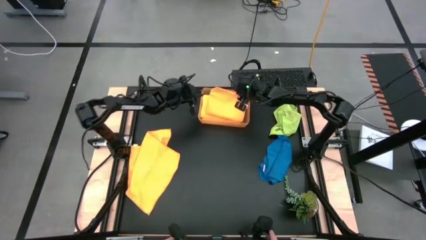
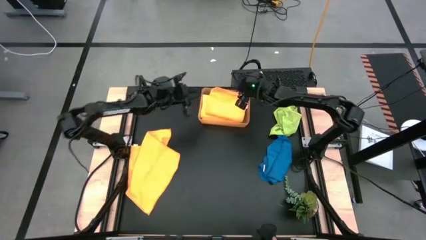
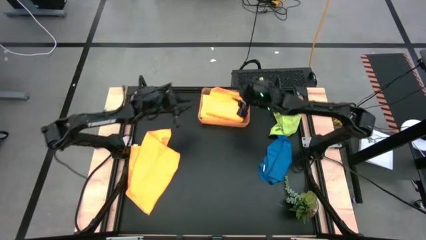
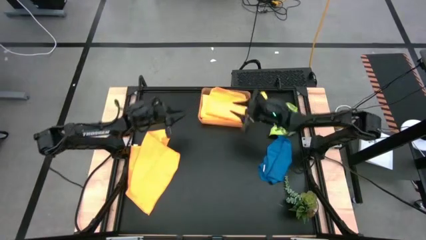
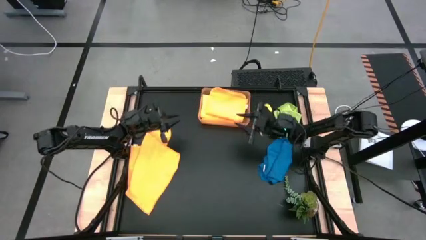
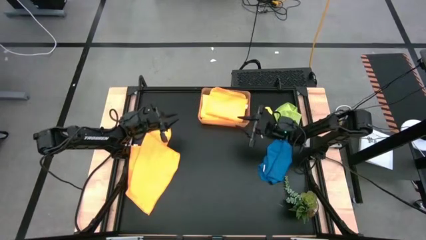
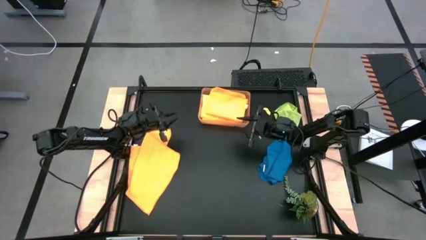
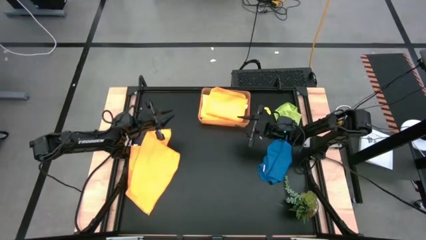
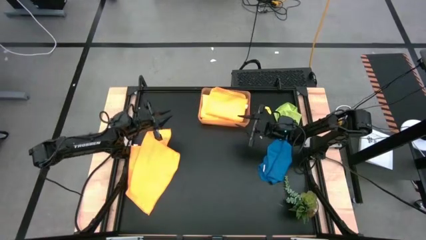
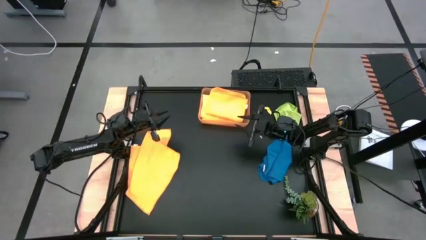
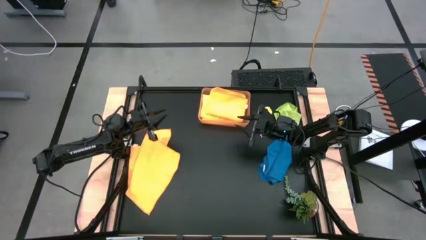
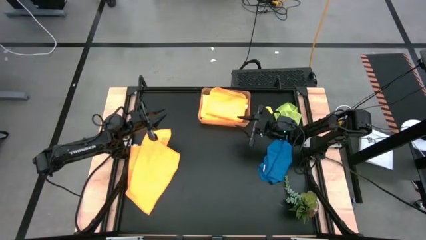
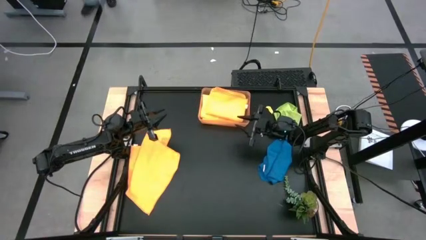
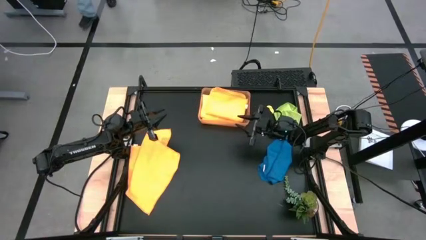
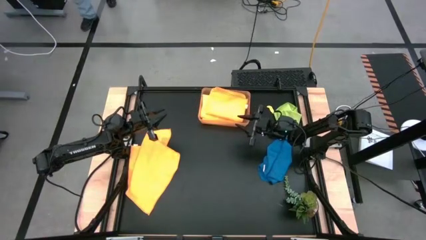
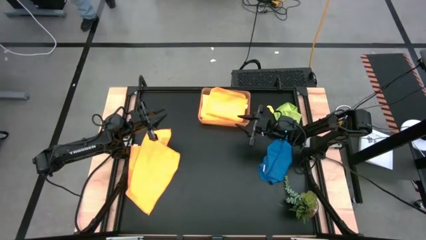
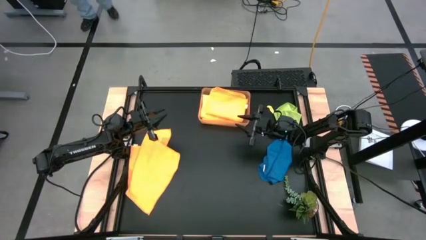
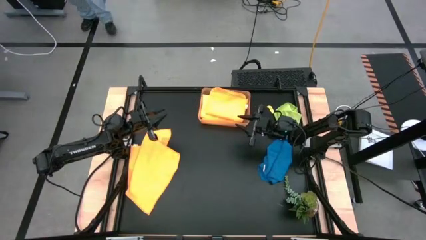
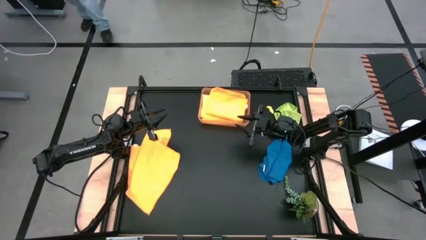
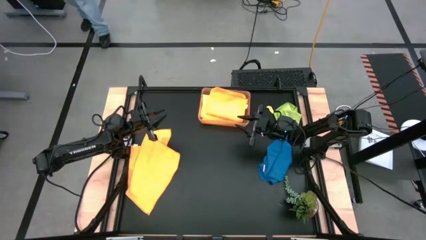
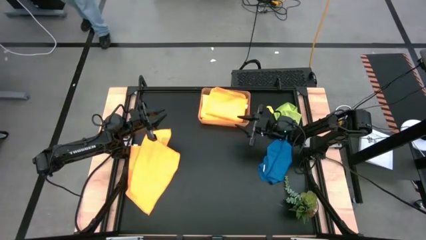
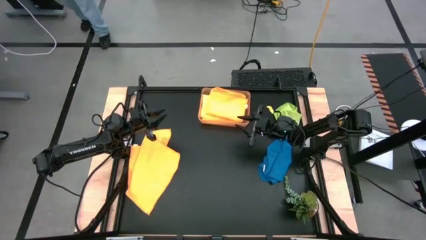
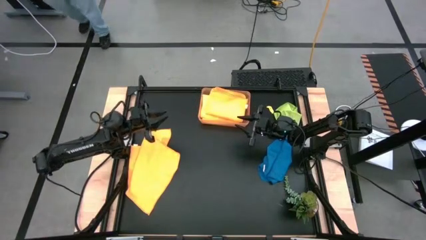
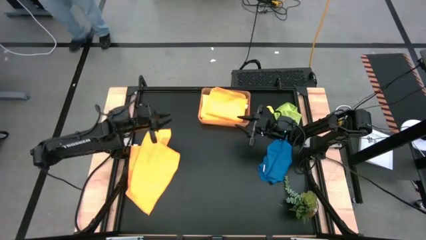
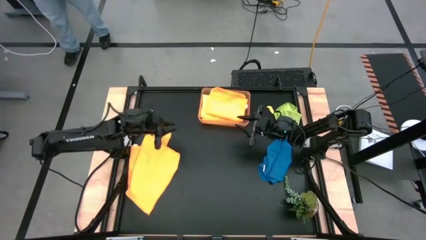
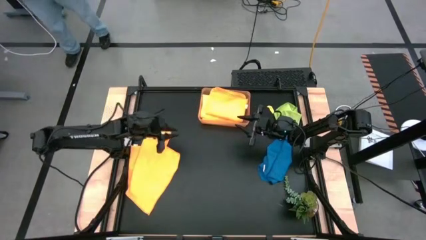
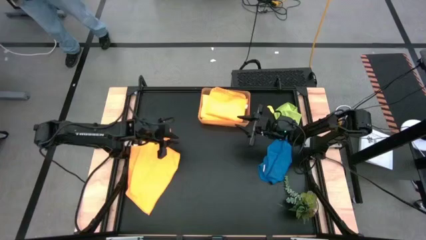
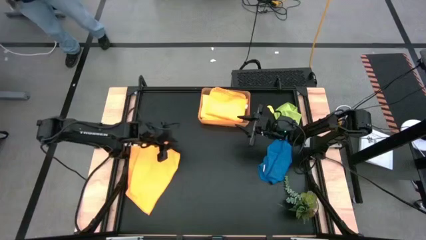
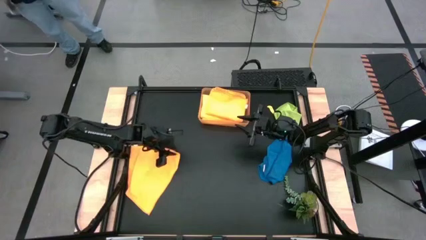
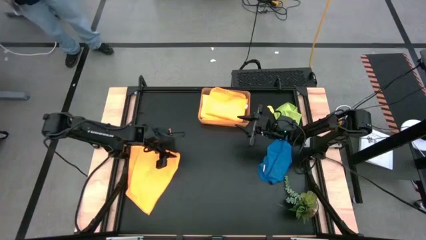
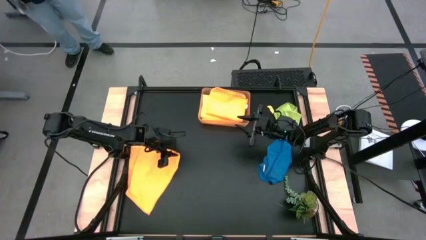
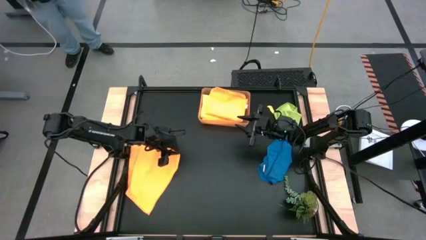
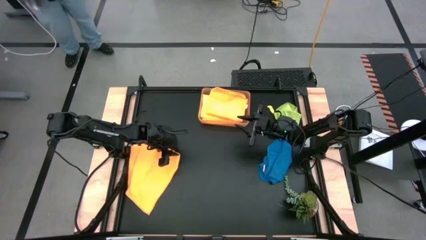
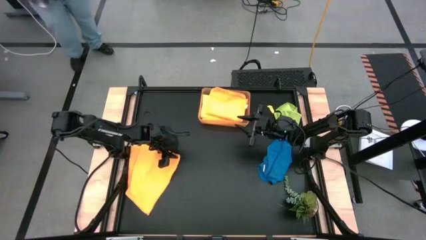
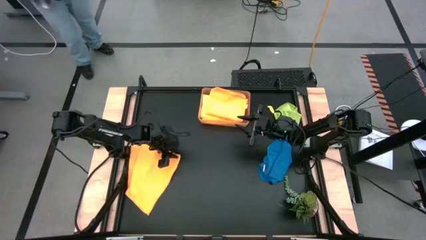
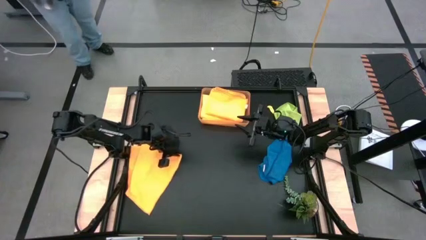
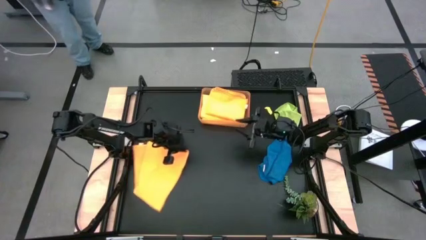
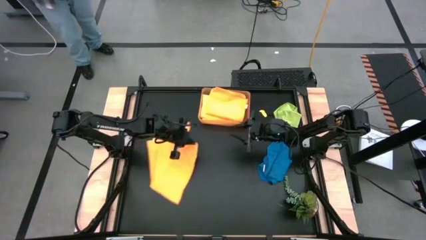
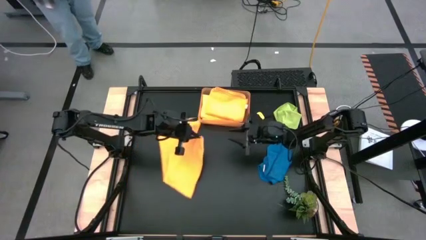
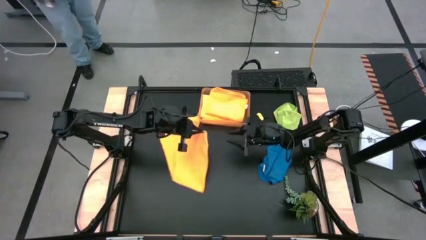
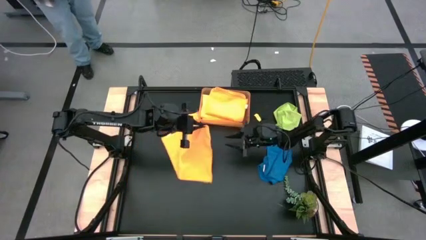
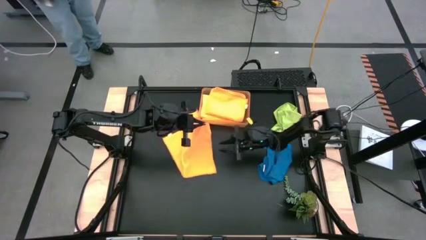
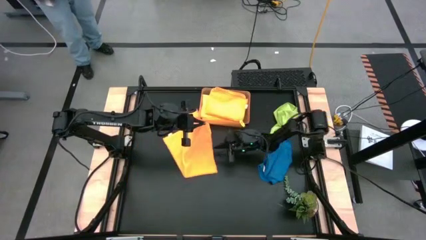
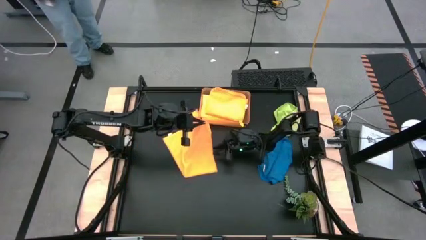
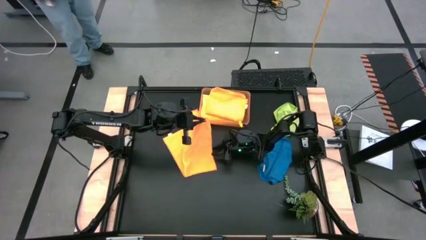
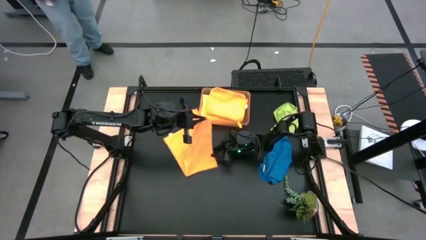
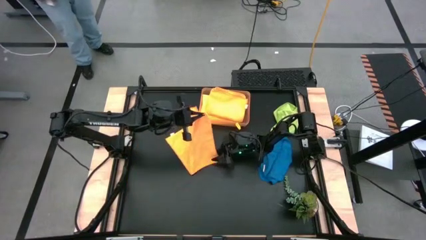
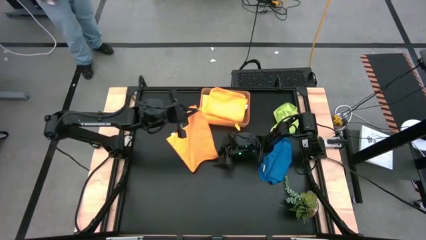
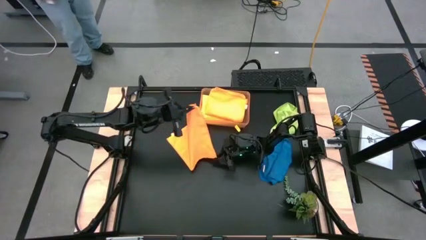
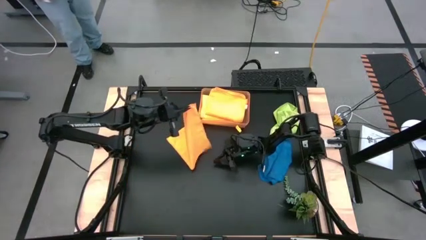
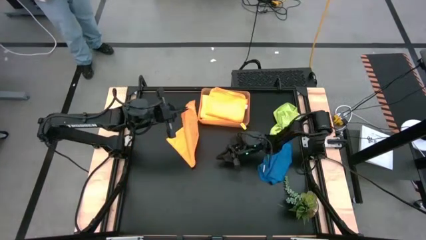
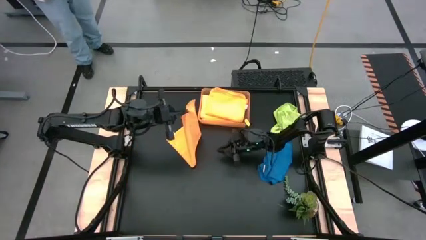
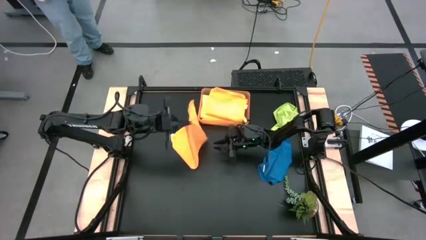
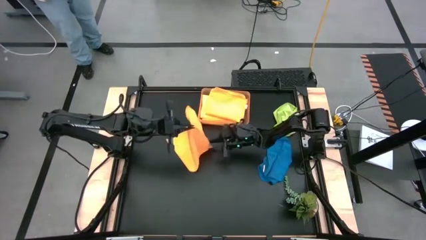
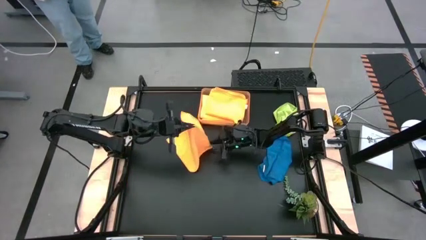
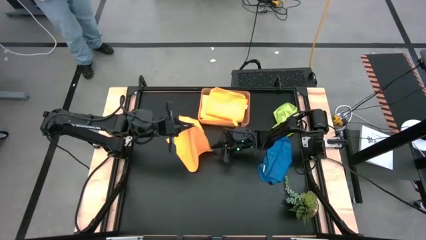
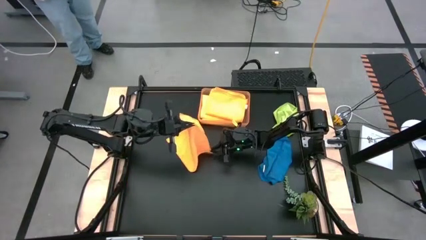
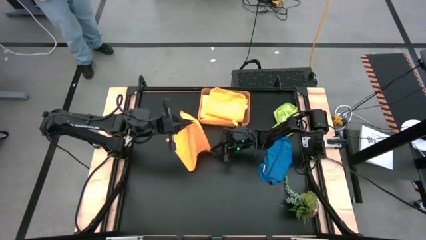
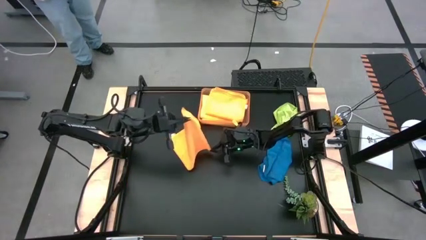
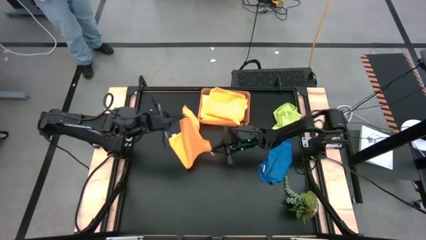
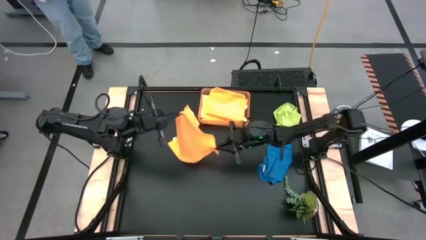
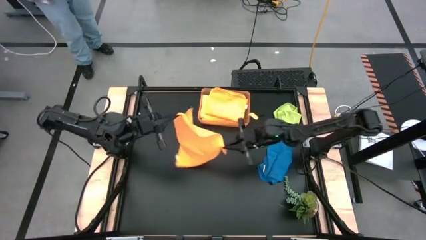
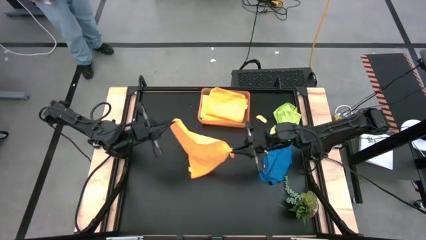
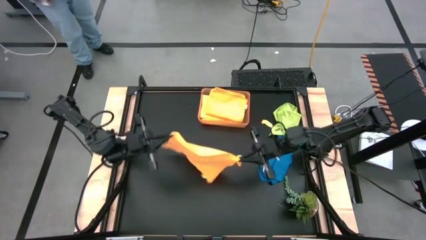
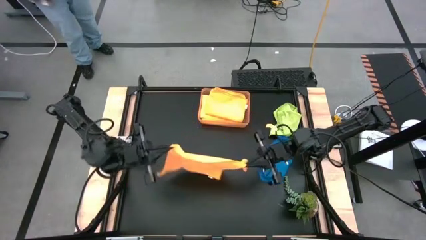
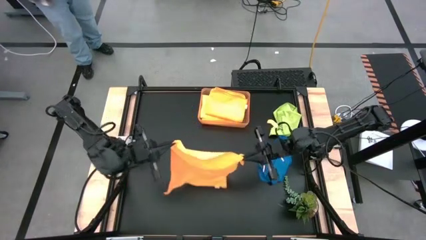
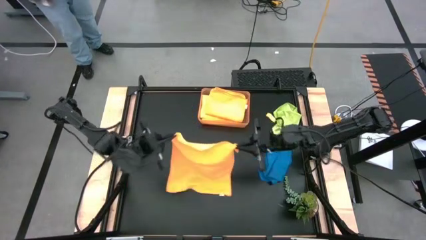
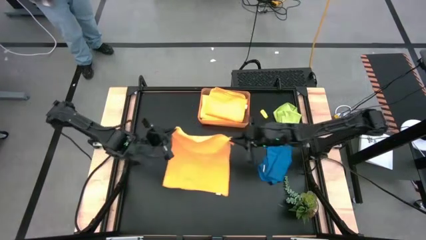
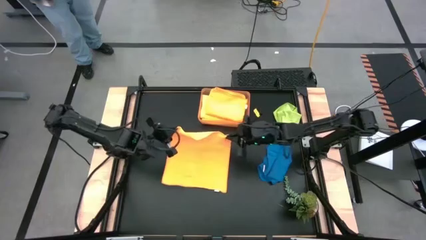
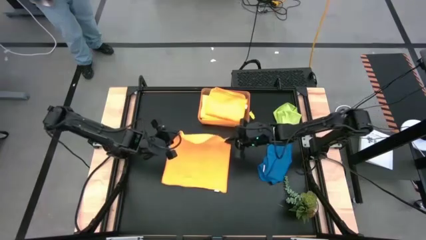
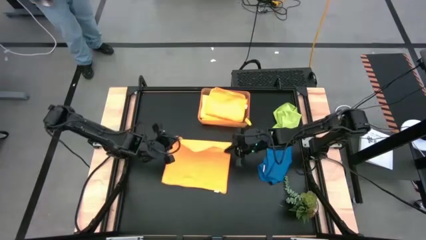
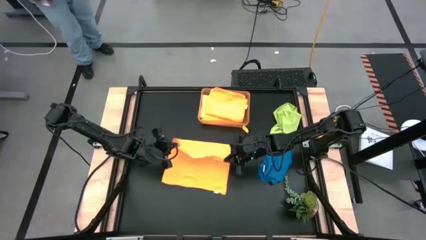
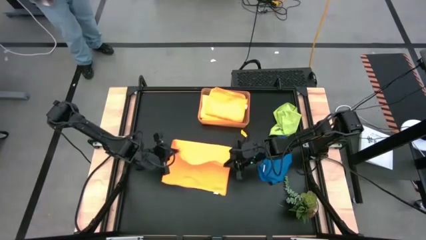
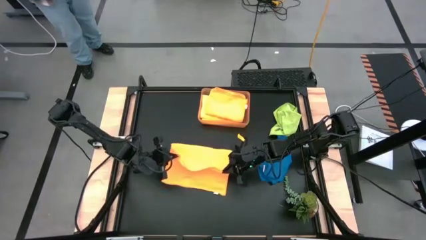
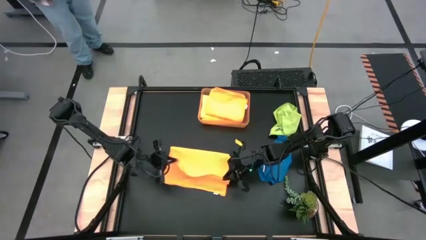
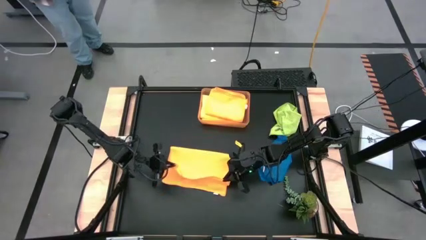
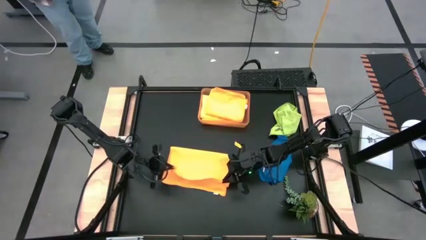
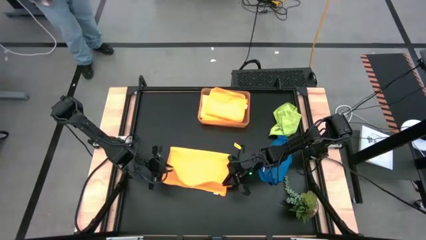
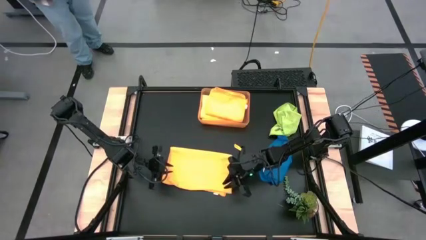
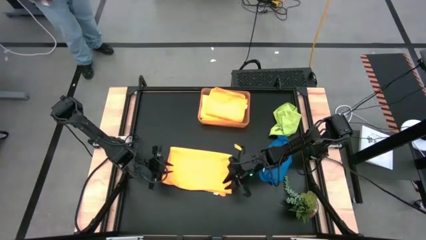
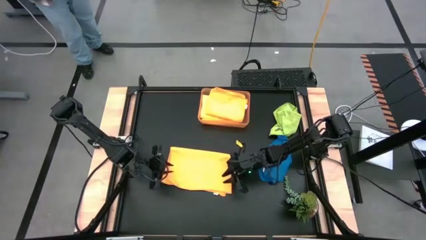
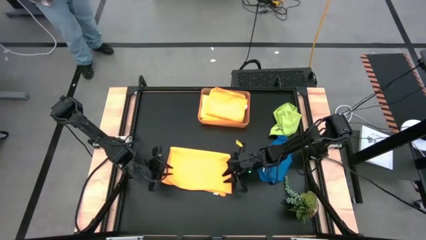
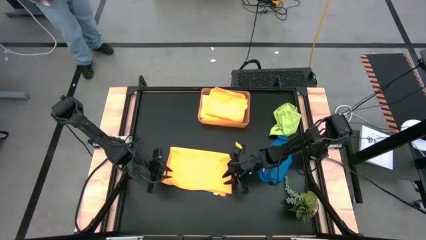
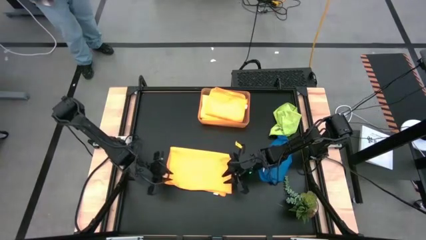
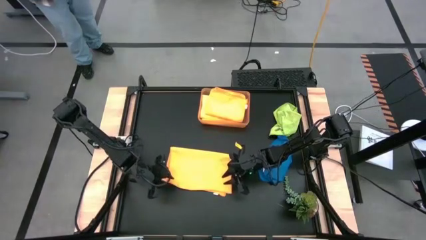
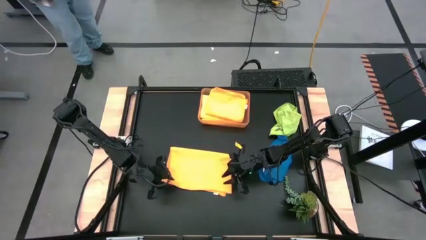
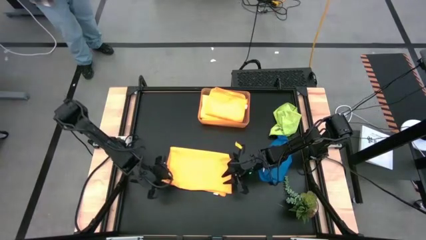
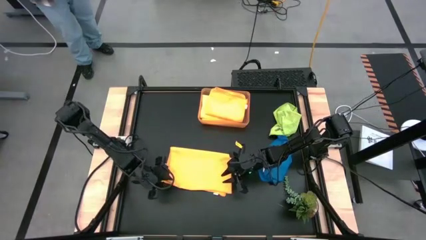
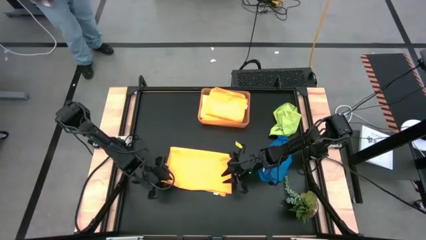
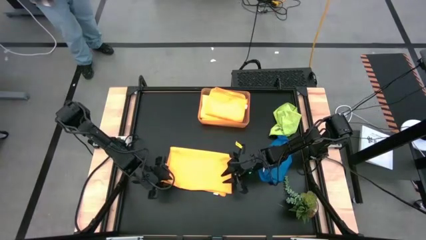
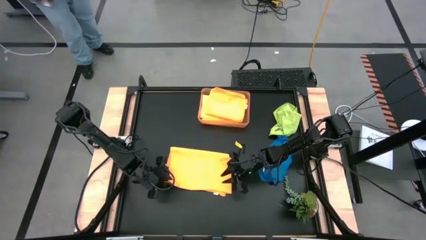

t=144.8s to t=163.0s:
Task: Fold microfiber towels
Fold the orange towel
